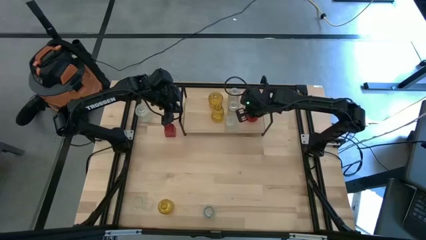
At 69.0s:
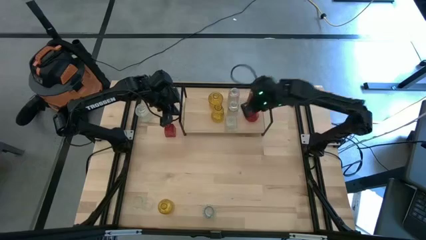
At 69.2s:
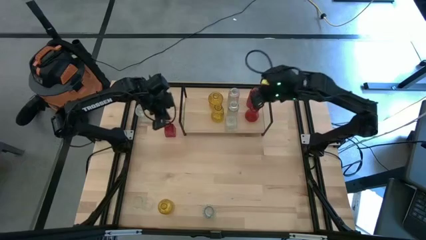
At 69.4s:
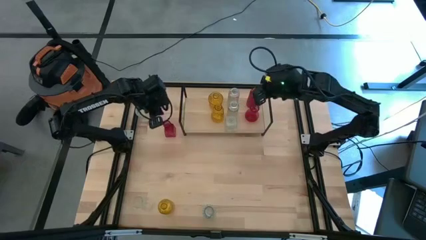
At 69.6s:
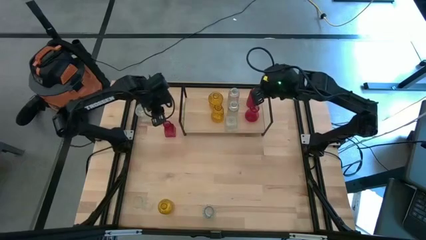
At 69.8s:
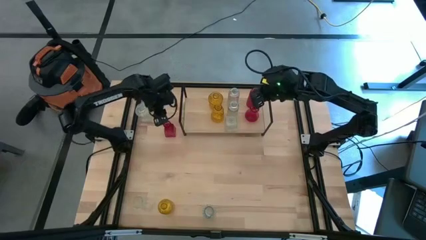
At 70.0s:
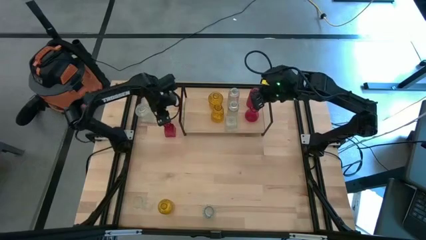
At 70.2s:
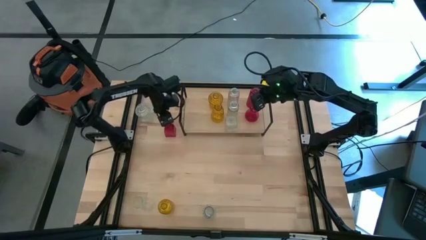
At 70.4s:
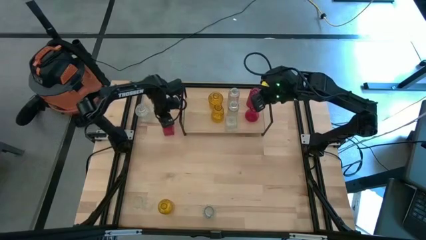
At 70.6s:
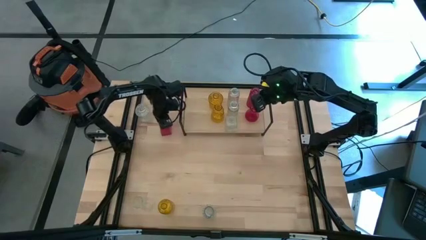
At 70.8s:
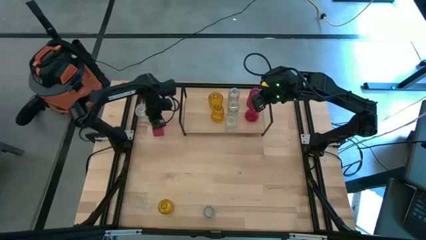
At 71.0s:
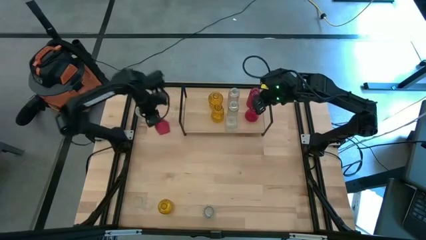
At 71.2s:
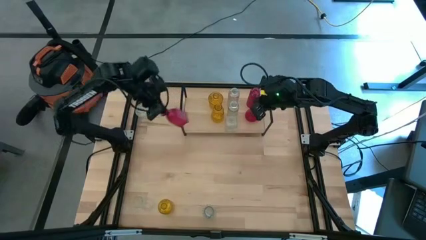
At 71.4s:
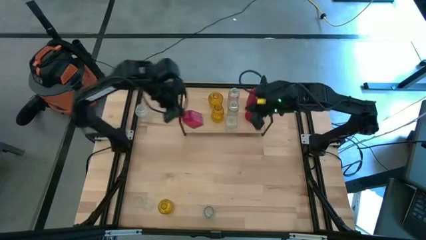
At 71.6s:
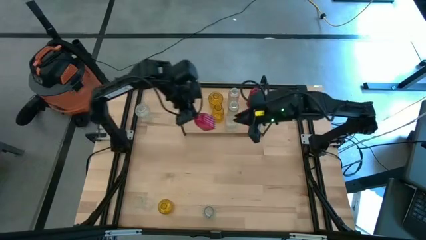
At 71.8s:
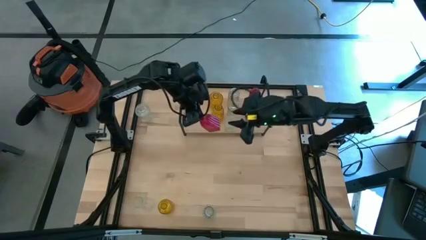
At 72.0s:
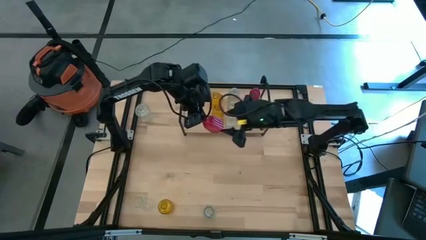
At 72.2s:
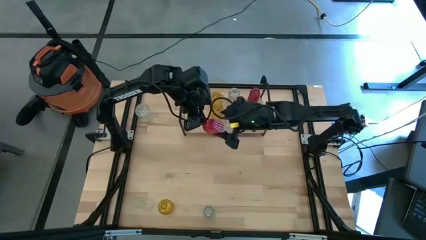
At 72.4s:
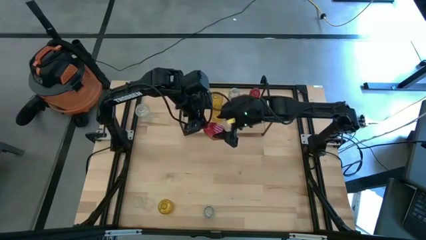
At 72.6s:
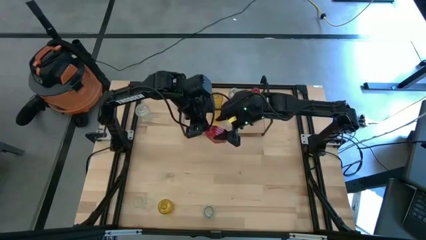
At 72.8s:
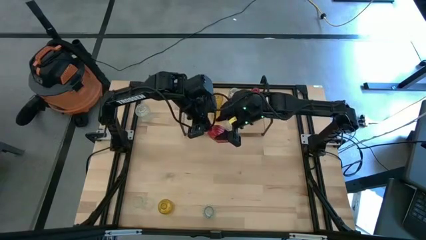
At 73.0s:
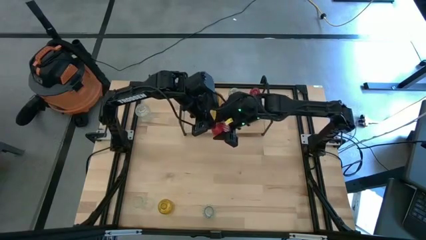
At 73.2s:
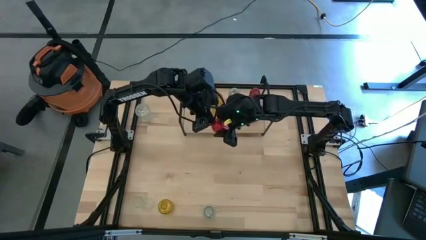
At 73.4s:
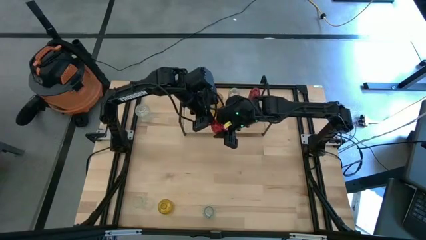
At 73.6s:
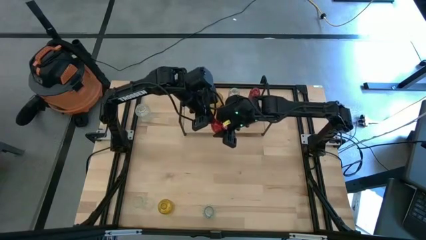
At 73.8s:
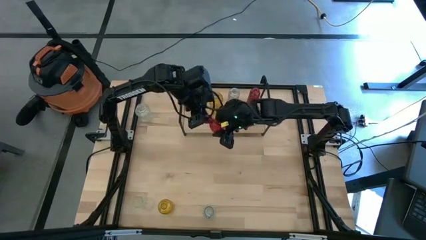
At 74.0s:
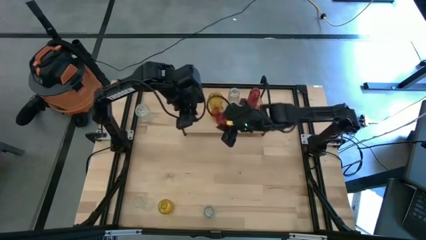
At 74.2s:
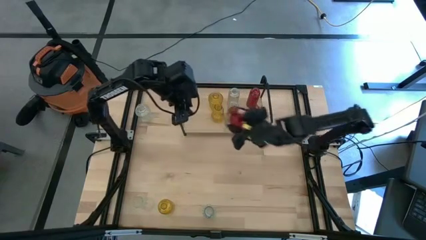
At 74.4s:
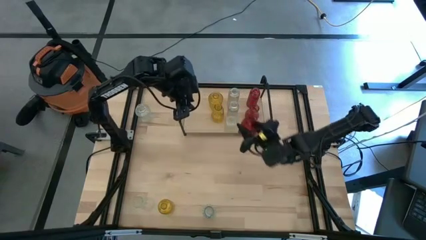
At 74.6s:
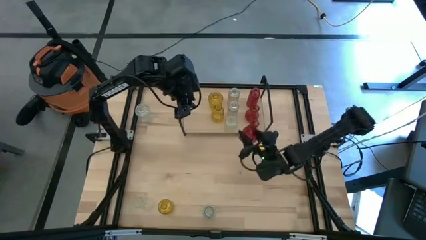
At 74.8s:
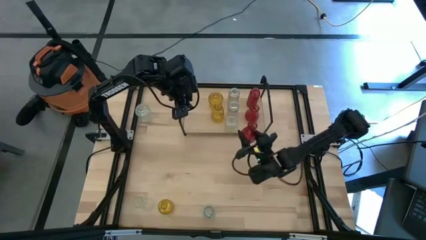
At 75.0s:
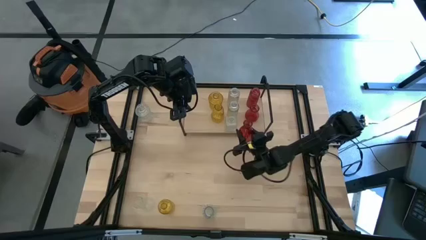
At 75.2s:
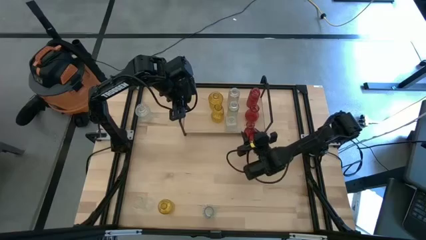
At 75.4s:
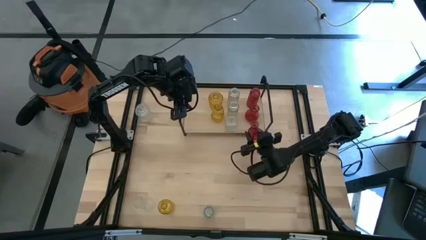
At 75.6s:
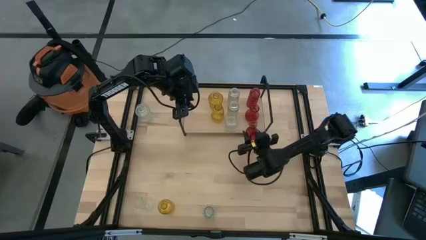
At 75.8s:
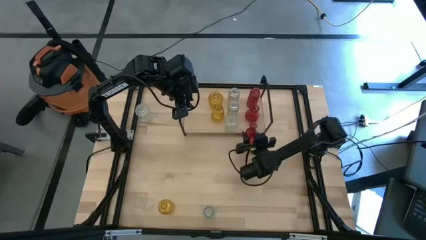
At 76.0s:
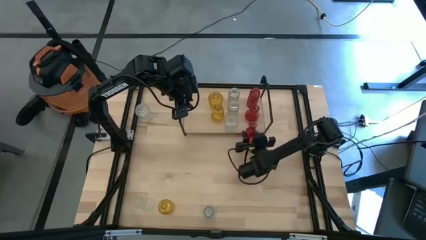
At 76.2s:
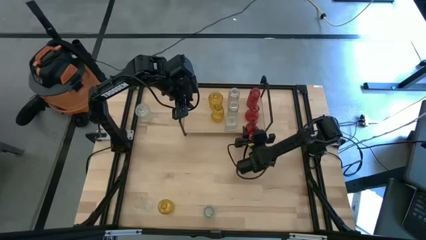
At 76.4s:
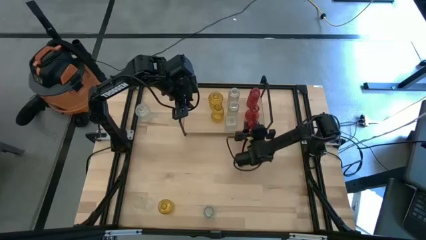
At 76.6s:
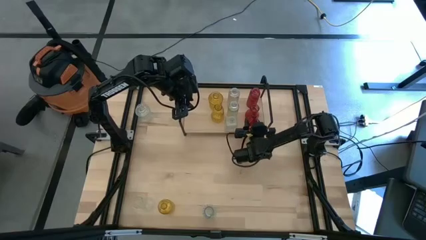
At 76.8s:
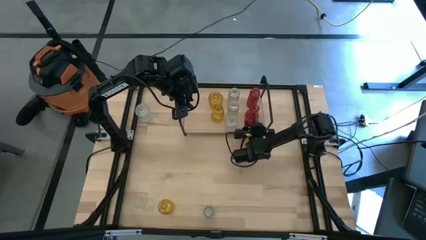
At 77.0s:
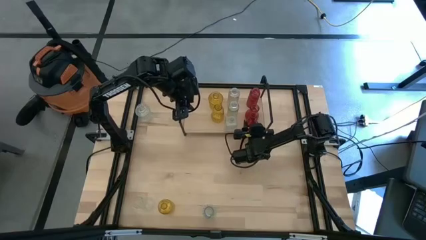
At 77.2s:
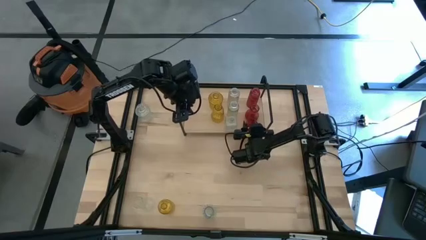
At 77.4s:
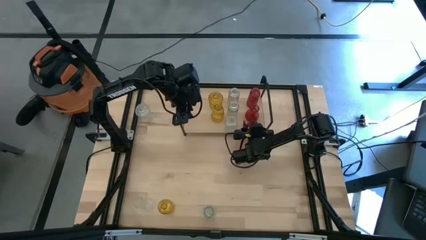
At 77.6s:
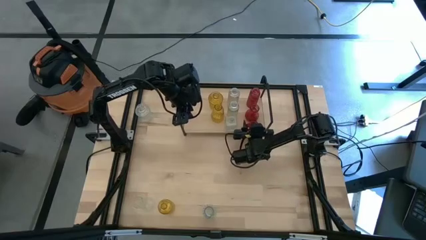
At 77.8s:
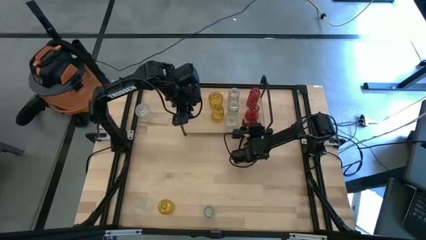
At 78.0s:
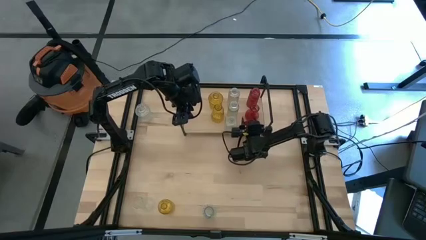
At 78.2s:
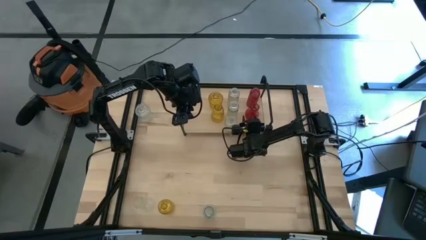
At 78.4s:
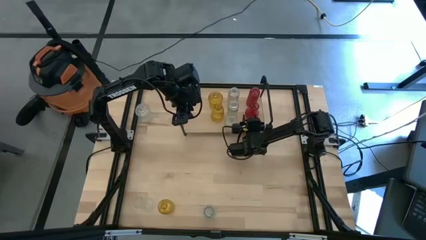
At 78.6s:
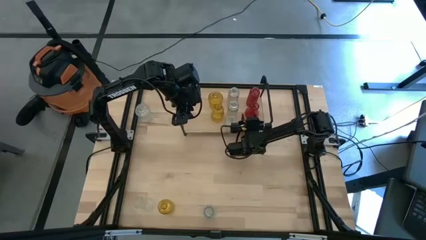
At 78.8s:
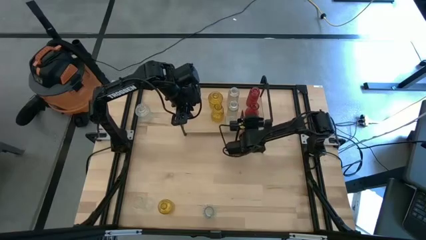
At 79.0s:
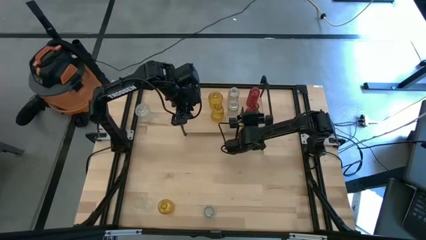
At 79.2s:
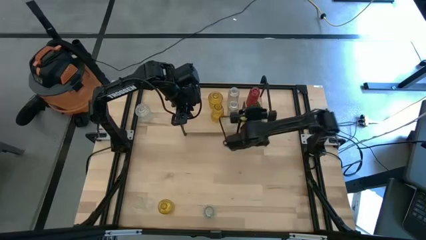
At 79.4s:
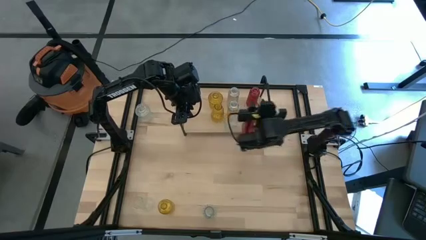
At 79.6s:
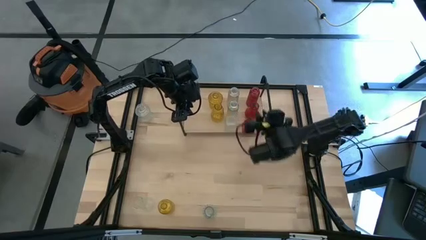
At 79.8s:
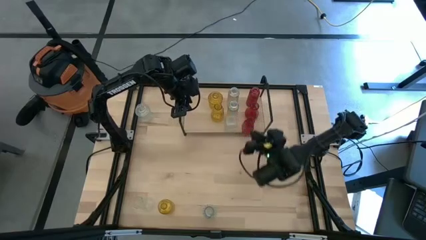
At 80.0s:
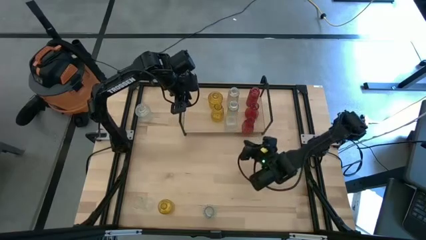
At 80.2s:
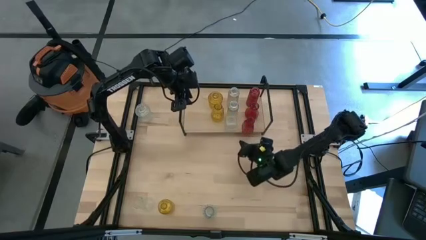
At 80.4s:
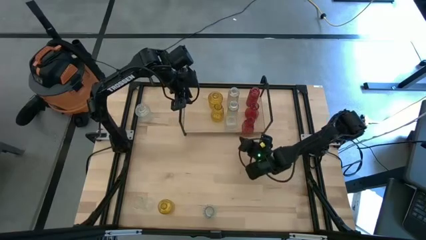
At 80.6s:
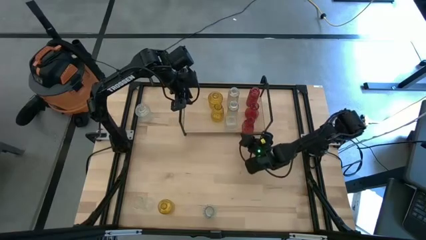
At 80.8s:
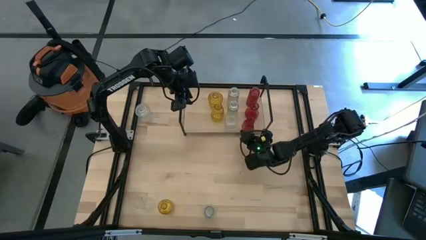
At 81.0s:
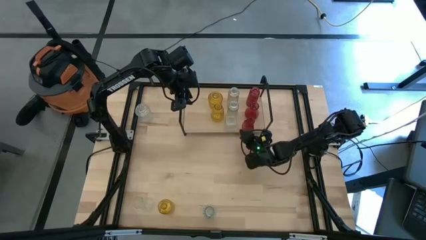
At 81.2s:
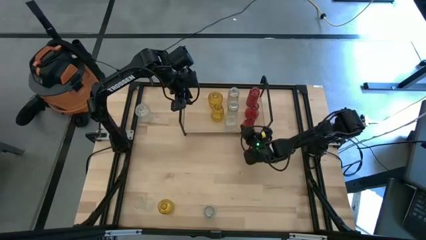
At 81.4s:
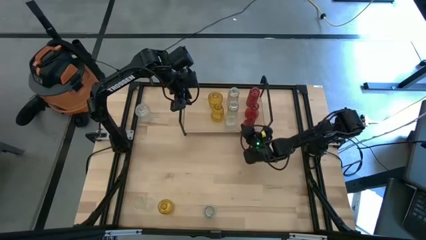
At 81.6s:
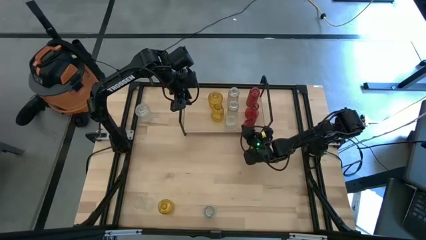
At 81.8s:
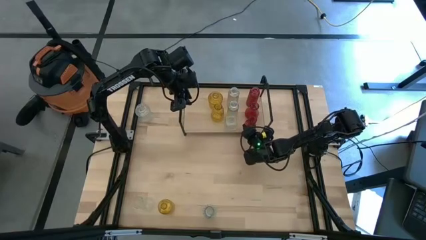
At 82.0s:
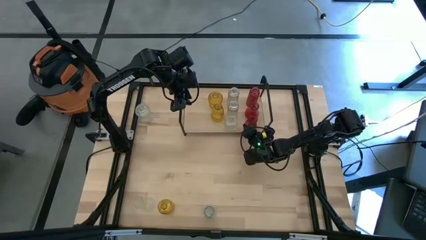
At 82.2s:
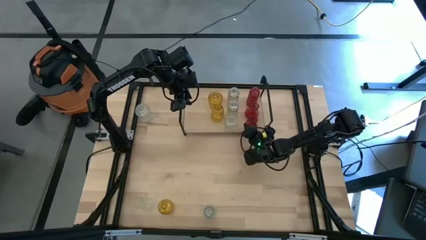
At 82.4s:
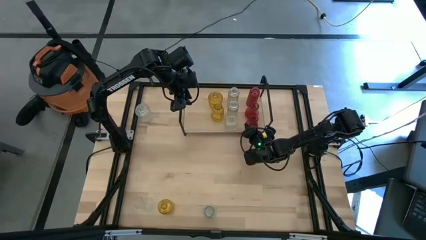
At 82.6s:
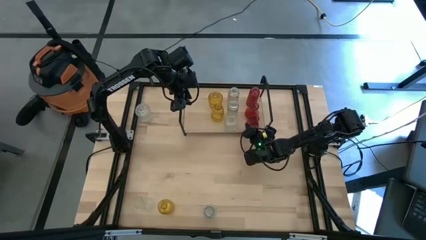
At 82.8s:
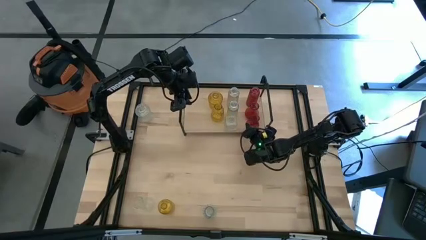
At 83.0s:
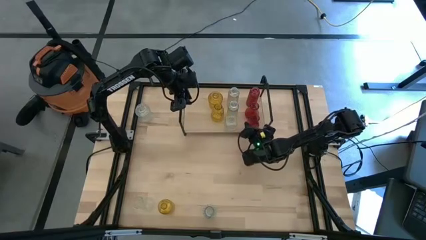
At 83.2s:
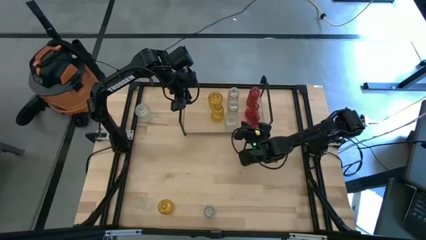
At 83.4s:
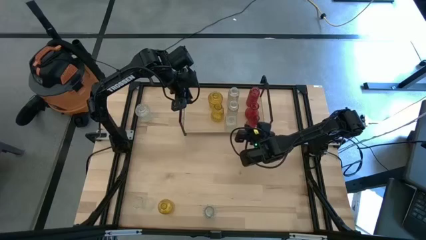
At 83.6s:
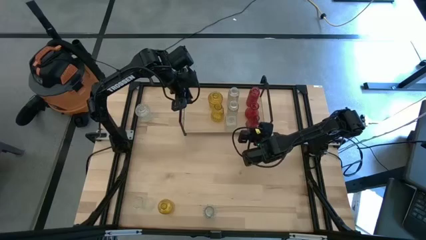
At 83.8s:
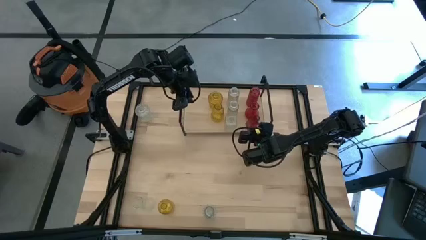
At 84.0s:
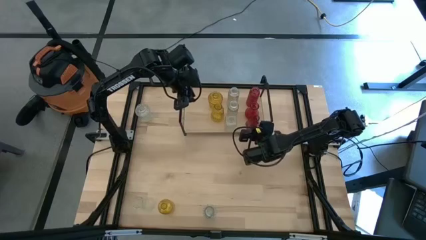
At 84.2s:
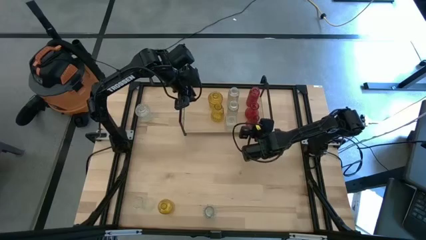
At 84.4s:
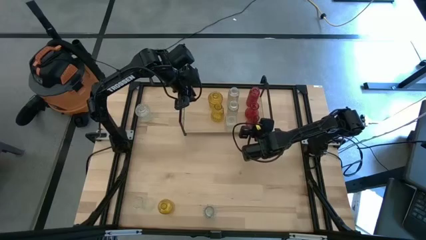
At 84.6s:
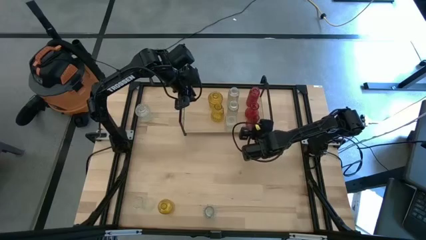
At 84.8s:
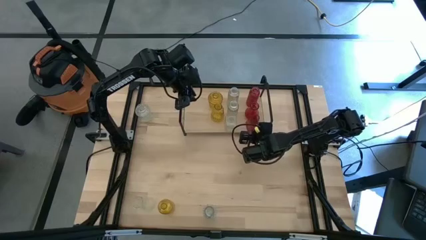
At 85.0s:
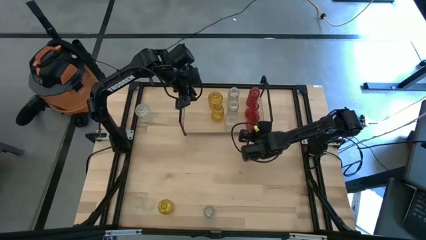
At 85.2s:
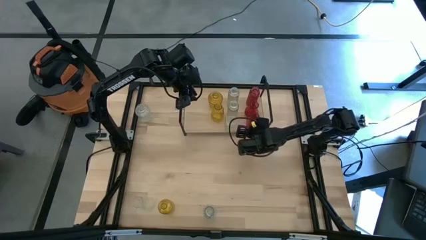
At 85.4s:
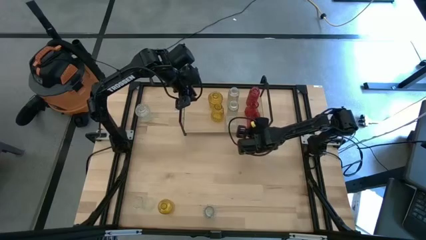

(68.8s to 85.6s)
Task: sort vases onto shelf
Put the red vase on the shelf aligned with the other red vases
